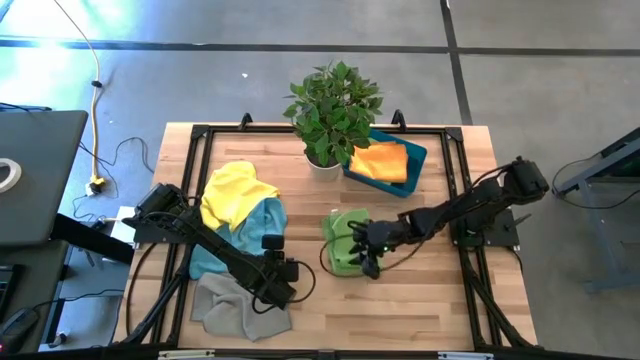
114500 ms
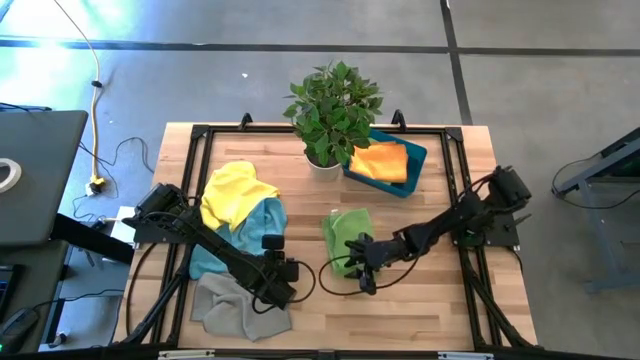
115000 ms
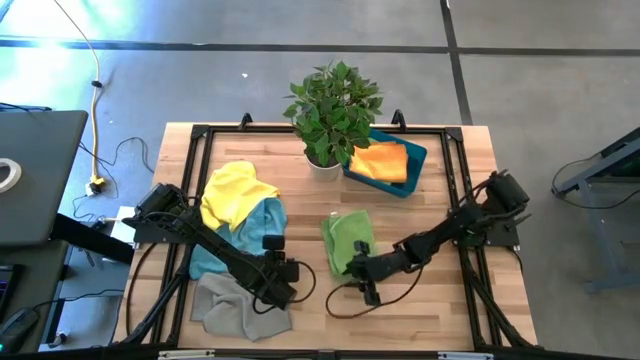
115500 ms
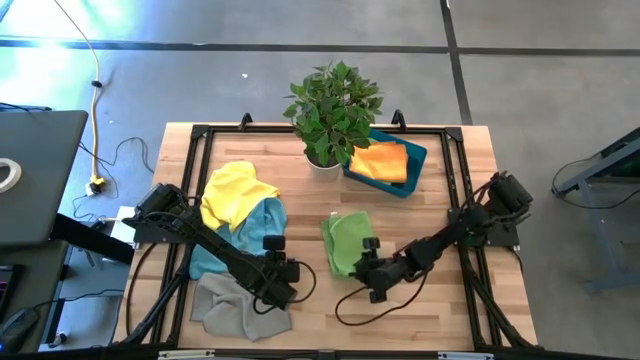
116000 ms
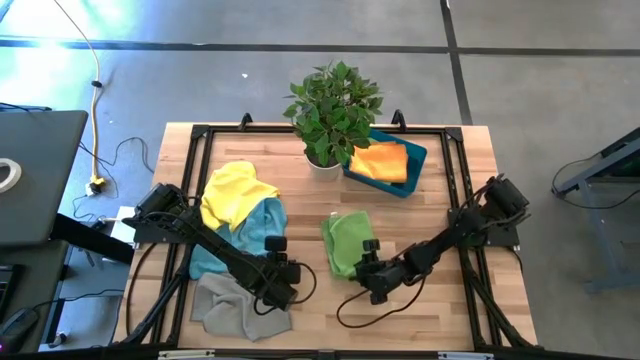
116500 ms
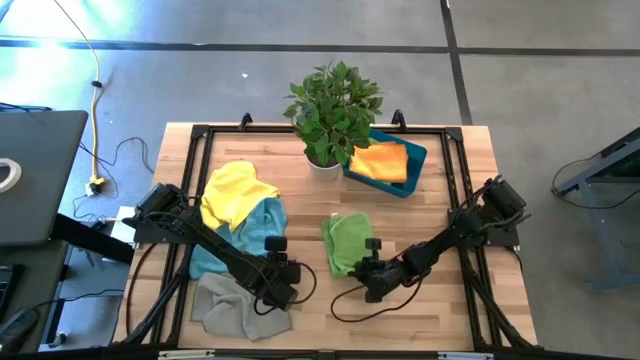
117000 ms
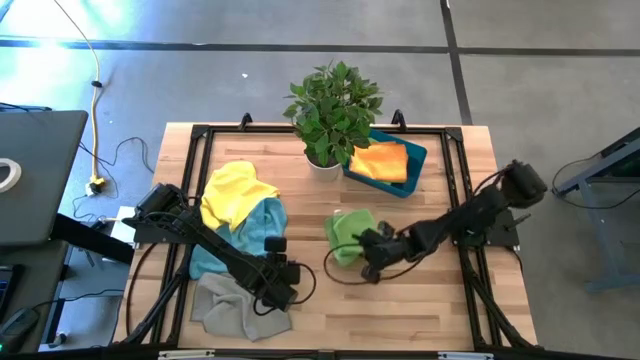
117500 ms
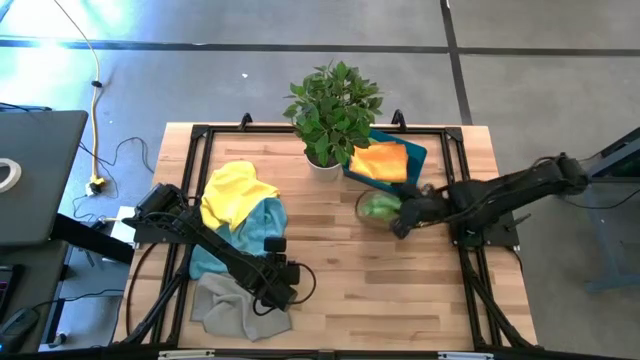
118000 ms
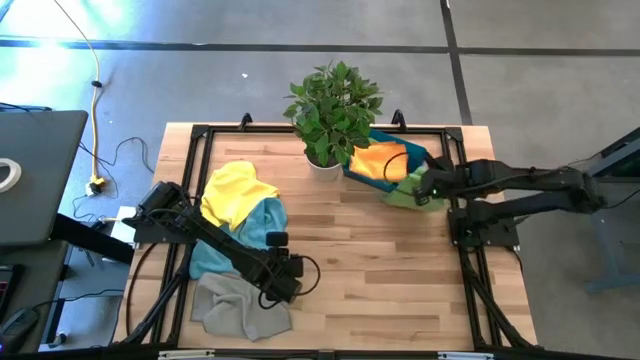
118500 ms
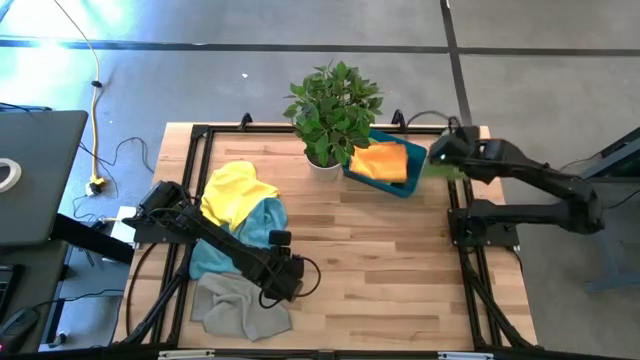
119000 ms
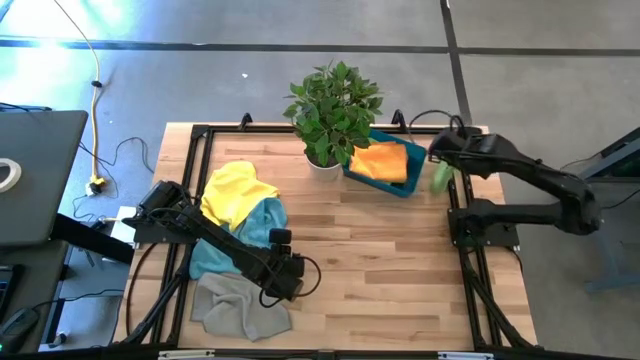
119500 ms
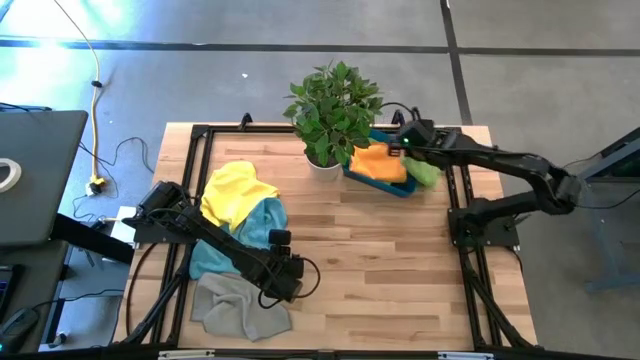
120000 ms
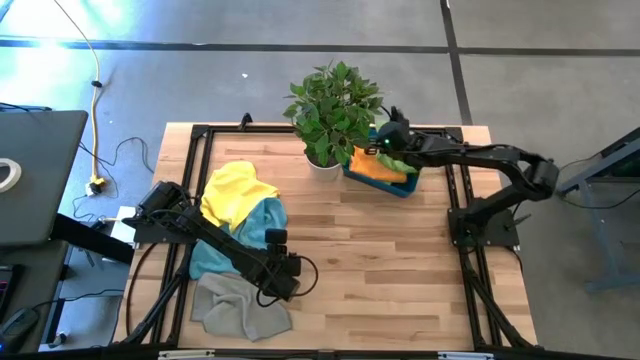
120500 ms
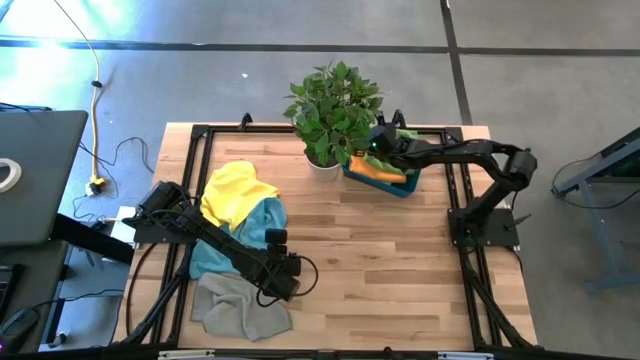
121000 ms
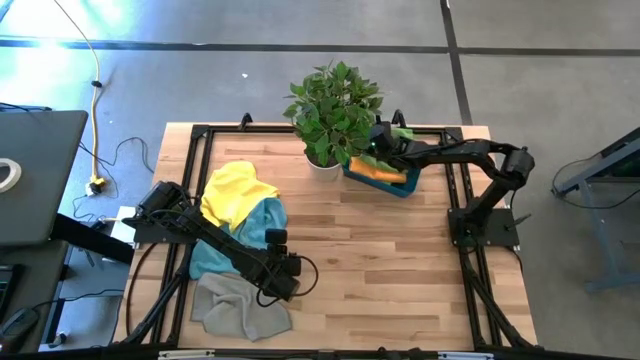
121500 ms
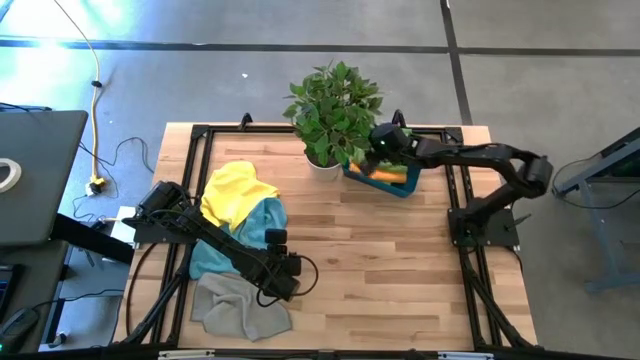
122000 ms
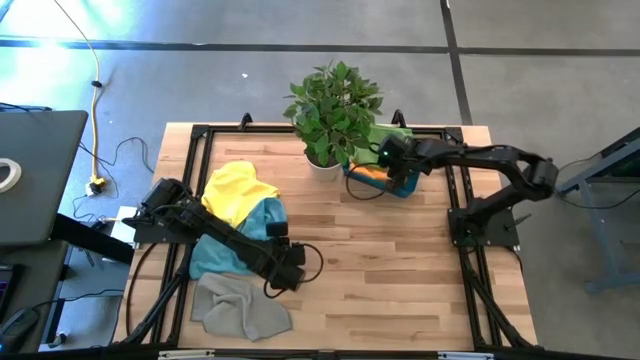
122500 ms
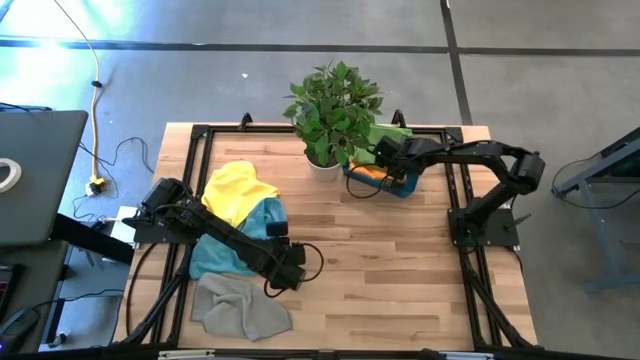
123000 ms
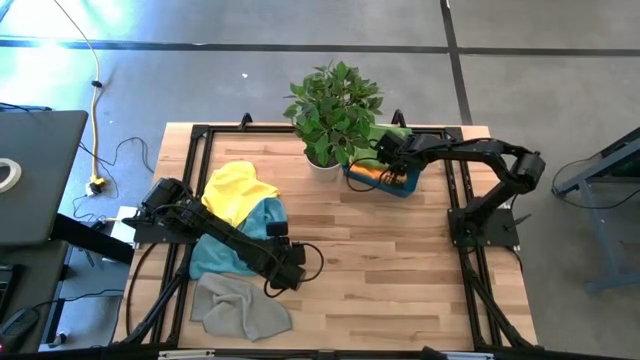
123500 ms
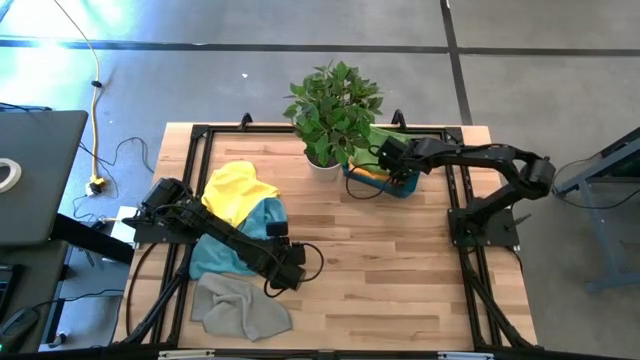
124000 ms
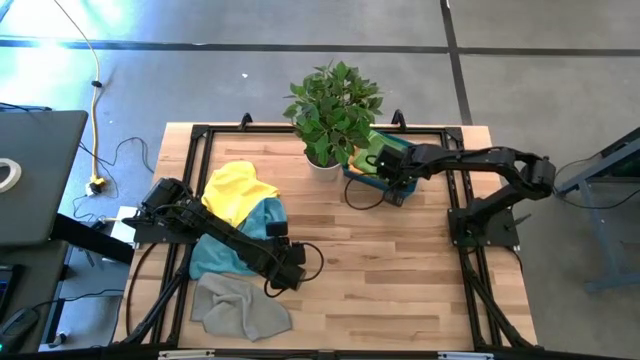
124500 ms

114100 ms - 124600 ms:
Task: Fold microfiber towels
Put the green towel into the blue bin

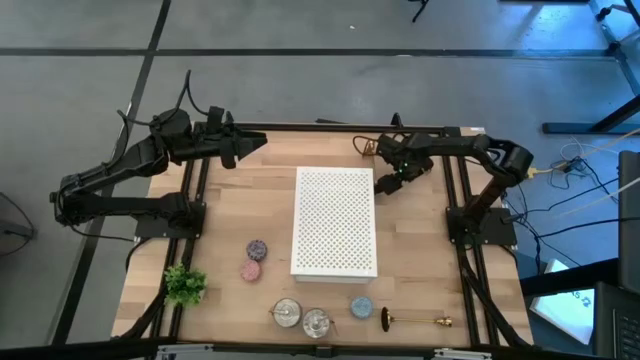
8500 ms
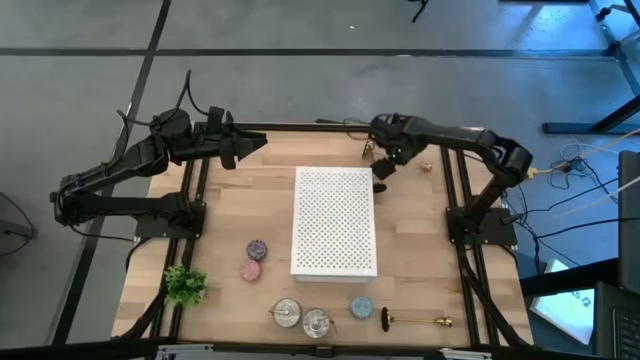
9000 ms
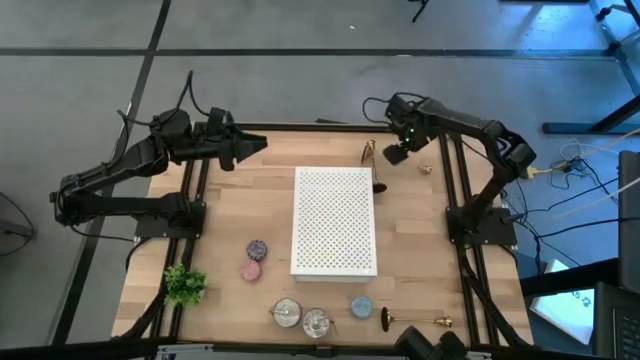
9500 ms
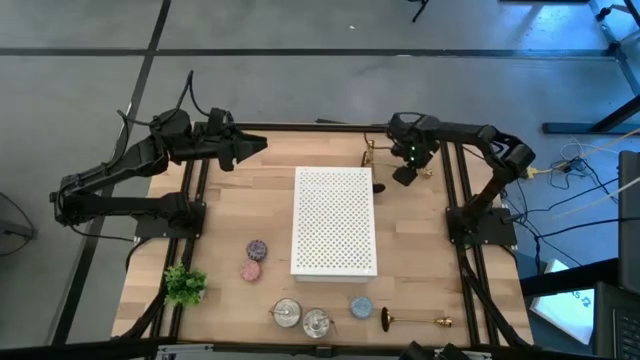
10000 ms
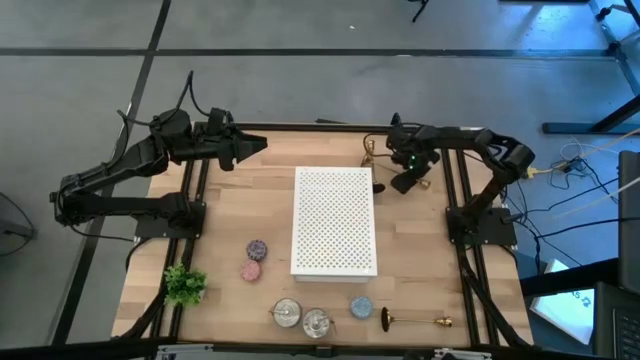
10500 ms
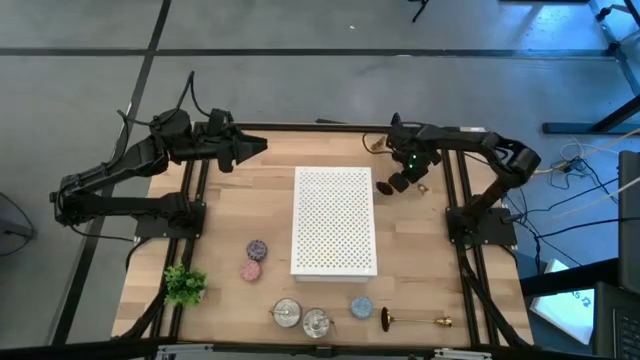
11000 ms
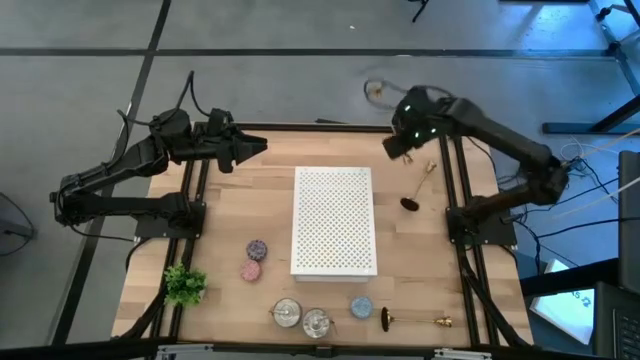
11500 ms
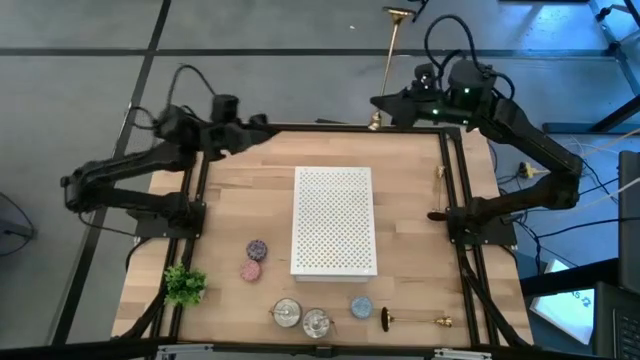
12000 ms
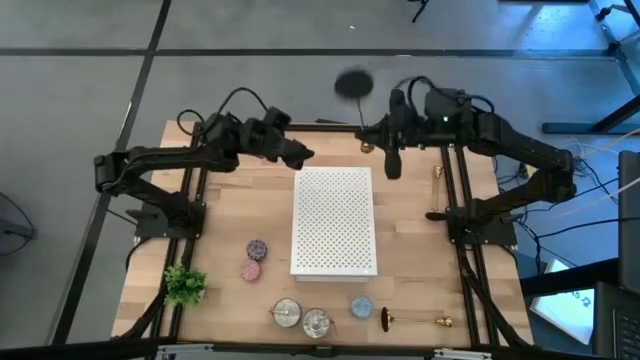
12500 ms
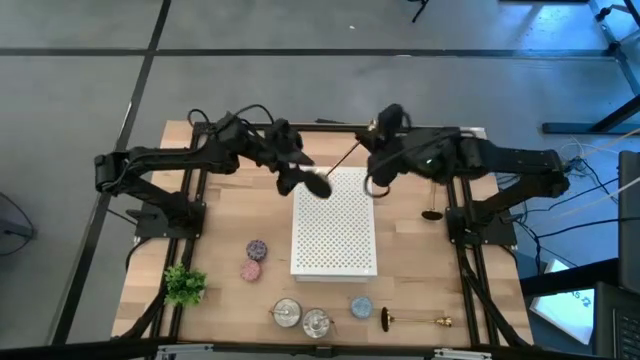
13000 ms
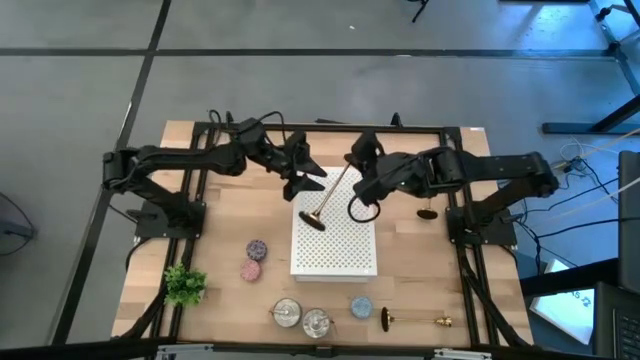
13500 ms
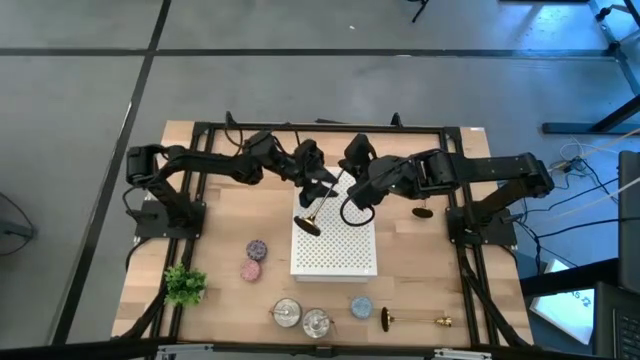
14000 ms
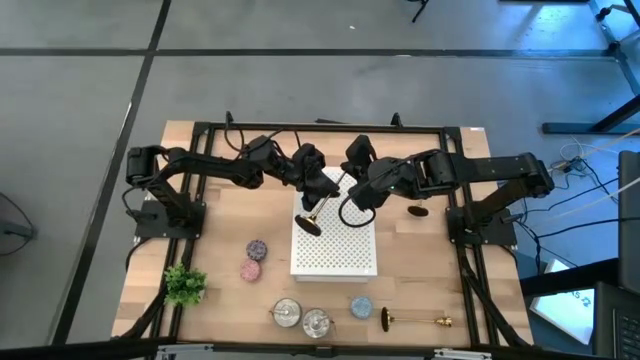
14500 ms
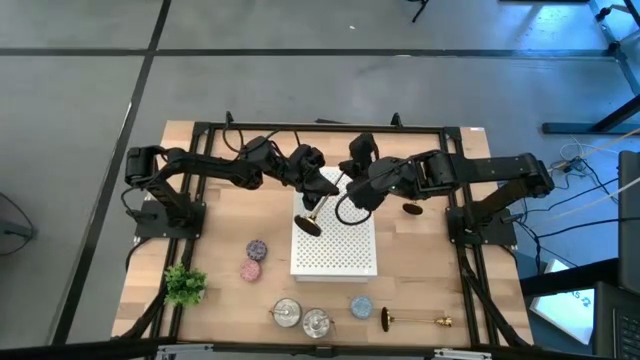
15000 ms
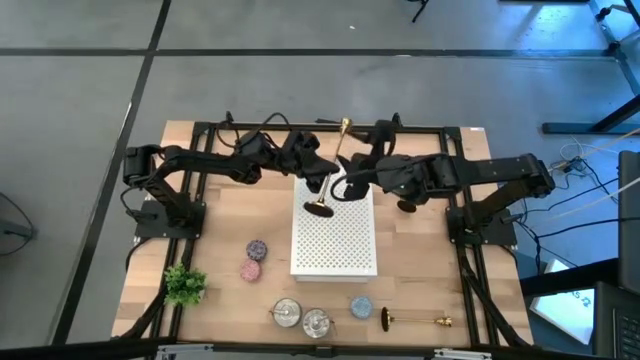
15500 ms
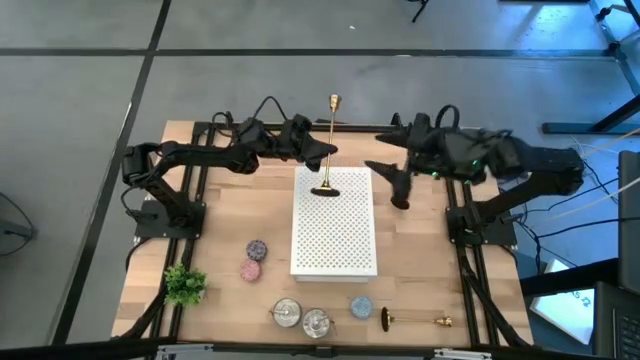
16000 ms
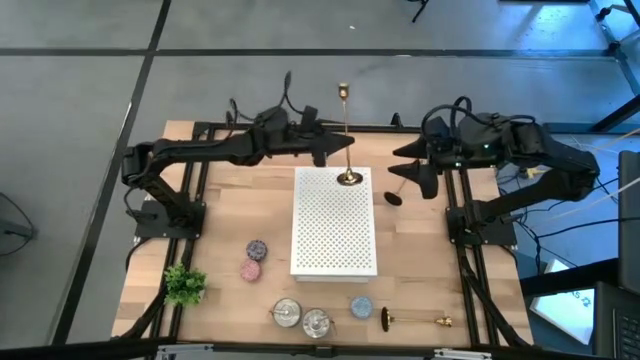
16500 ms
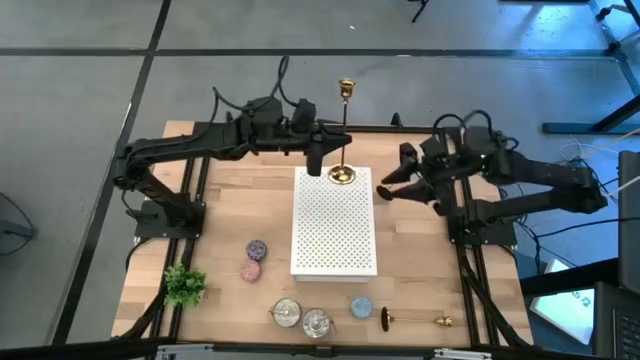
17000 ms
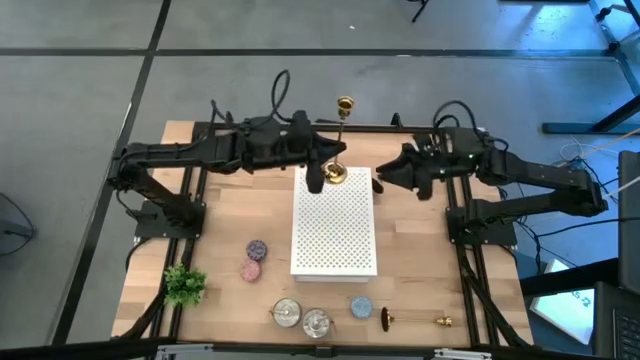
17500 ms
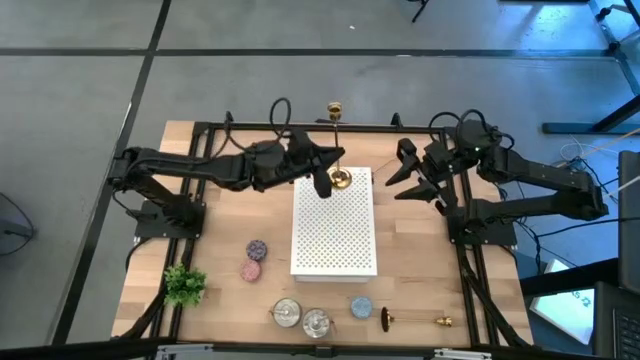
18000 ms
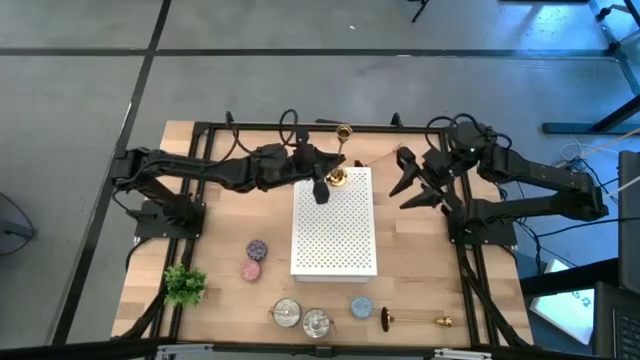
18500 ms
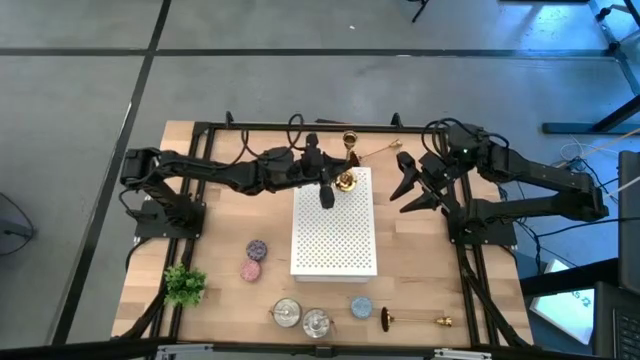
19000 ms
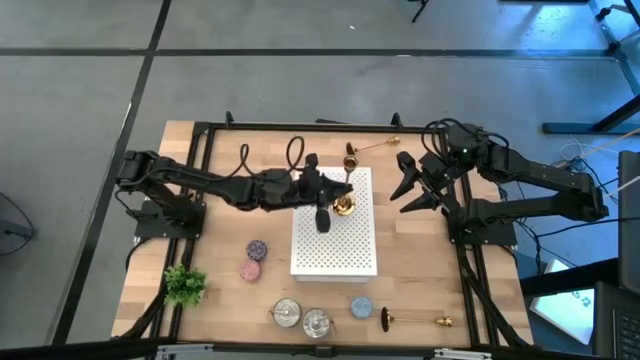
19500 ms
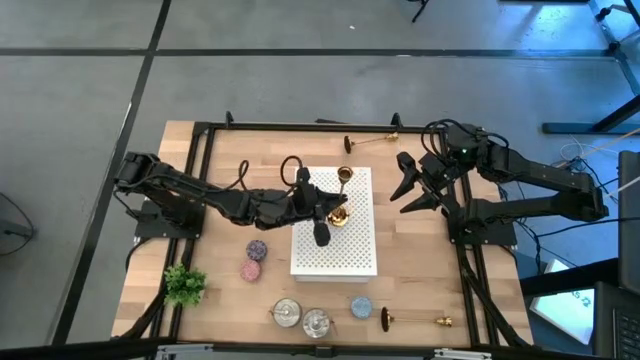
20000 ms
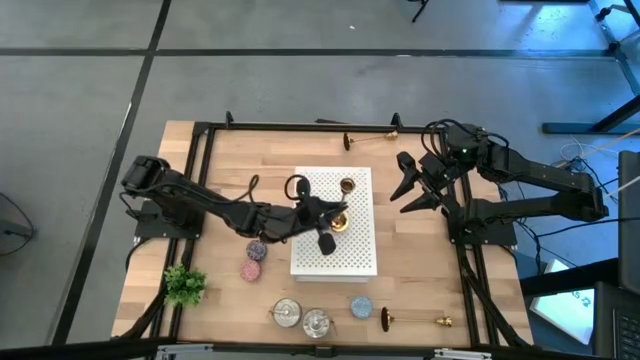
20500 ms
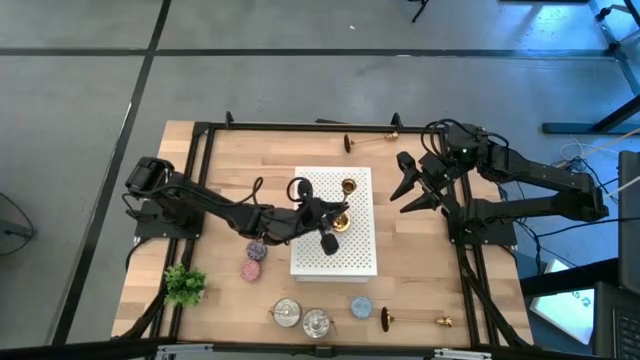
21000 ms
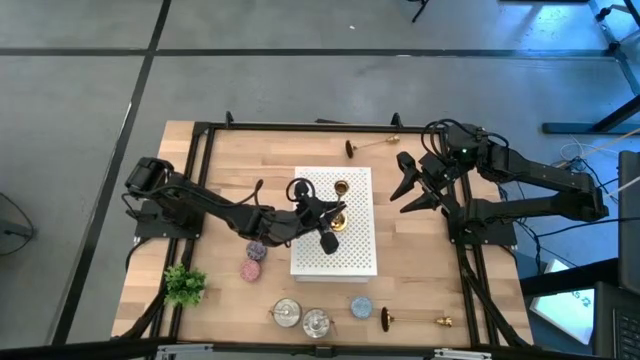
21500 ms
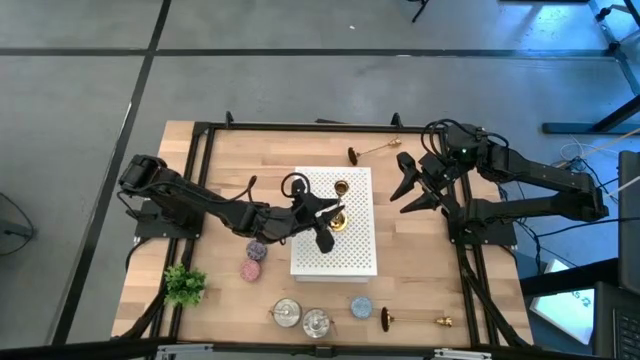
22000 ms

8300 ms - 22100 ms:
Task: Pick & Place candle stick holders
Put the top right gold candle holder on the shelf
